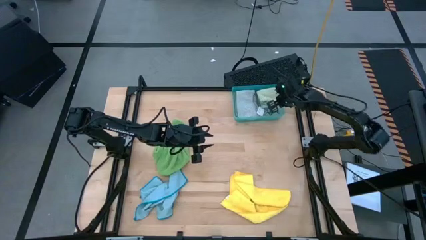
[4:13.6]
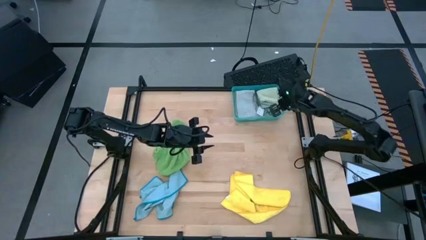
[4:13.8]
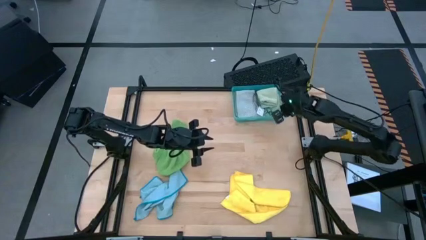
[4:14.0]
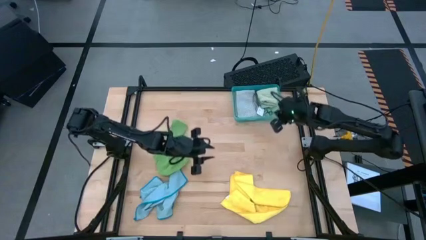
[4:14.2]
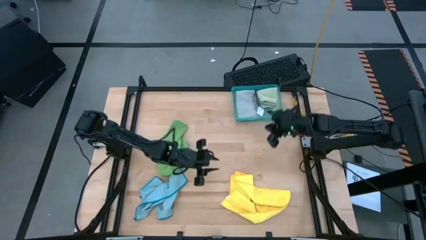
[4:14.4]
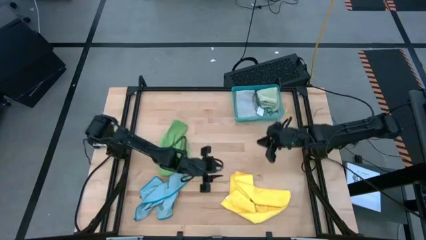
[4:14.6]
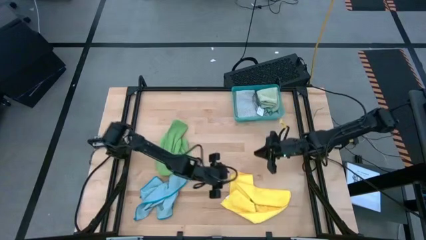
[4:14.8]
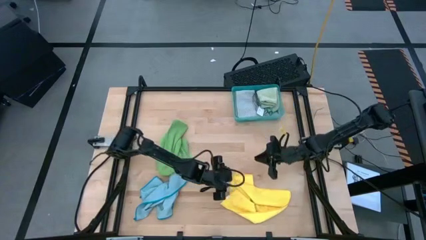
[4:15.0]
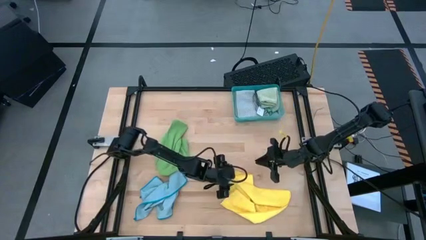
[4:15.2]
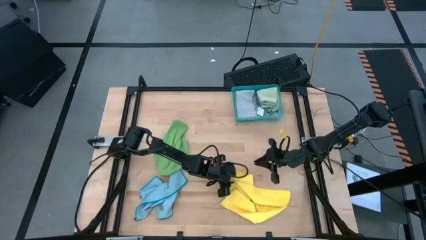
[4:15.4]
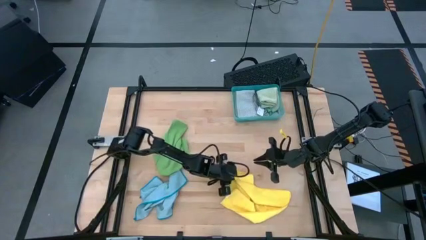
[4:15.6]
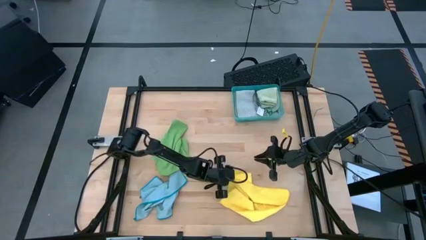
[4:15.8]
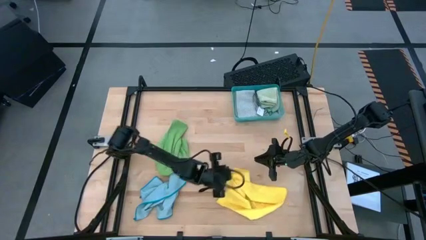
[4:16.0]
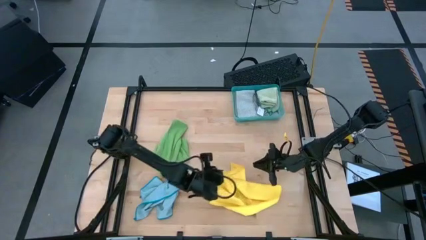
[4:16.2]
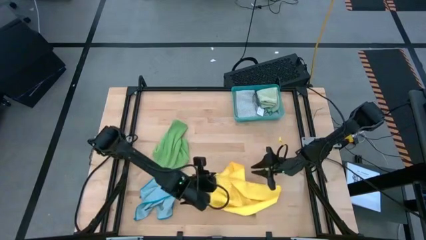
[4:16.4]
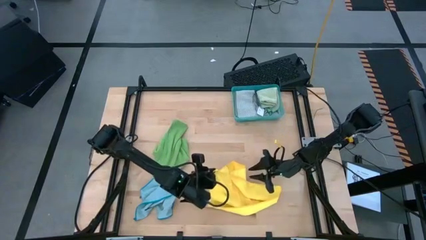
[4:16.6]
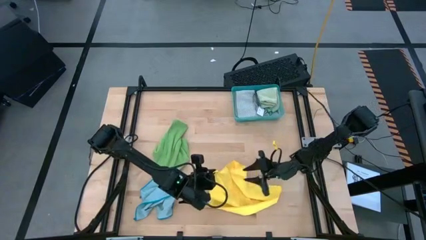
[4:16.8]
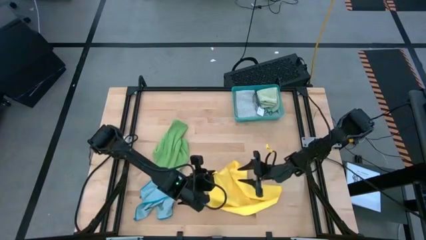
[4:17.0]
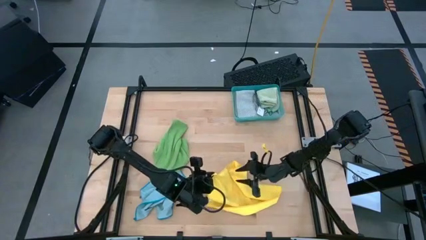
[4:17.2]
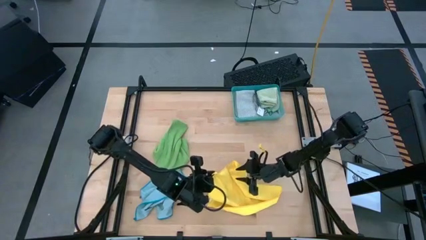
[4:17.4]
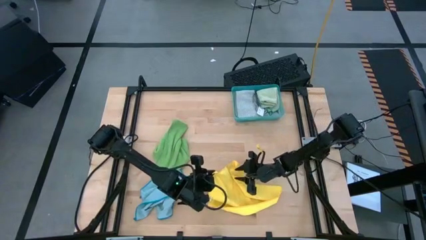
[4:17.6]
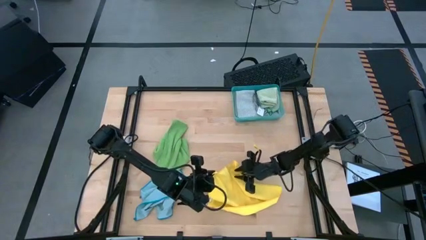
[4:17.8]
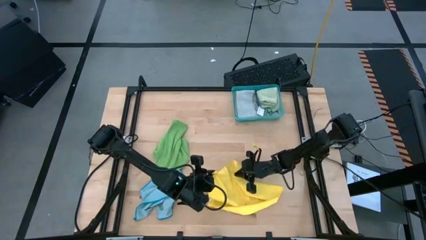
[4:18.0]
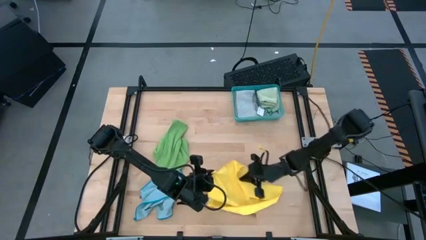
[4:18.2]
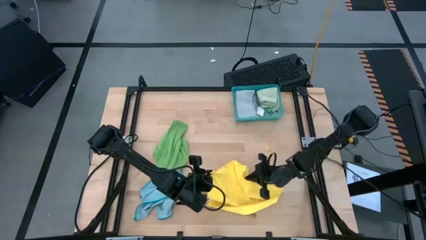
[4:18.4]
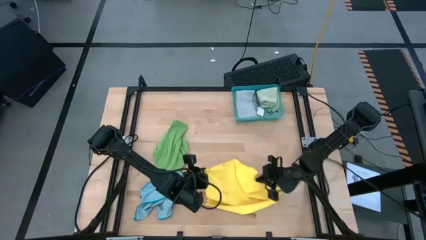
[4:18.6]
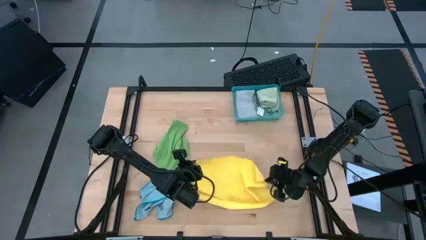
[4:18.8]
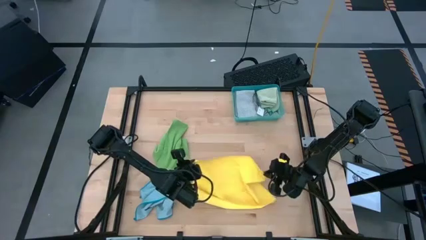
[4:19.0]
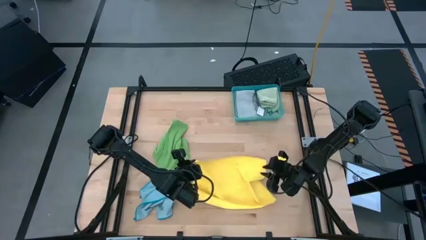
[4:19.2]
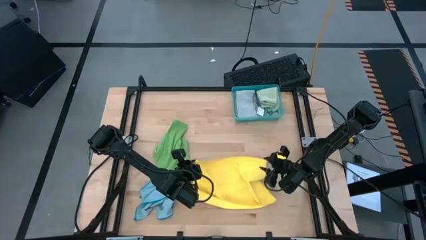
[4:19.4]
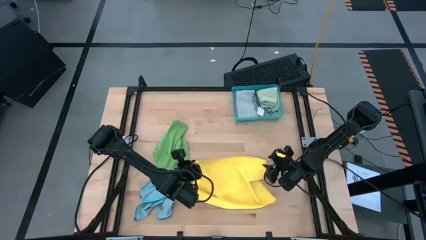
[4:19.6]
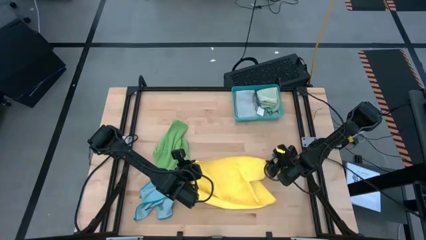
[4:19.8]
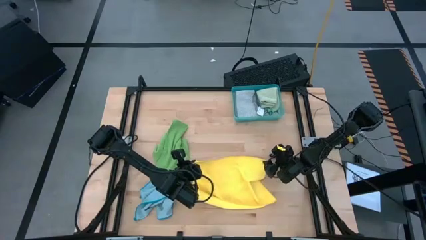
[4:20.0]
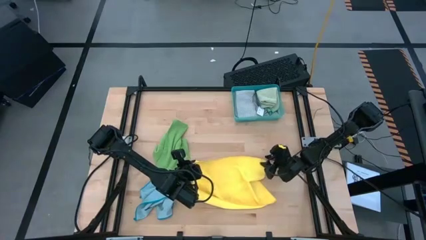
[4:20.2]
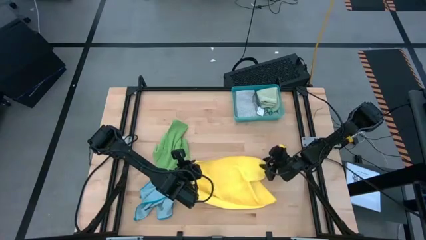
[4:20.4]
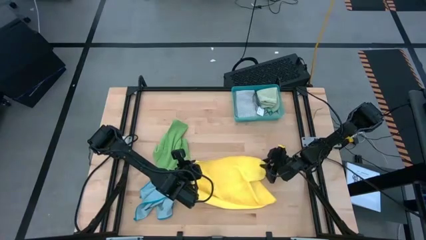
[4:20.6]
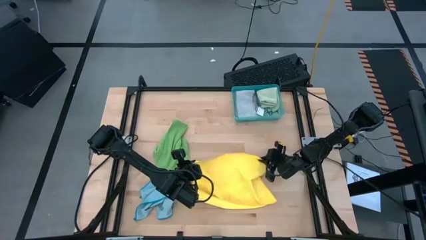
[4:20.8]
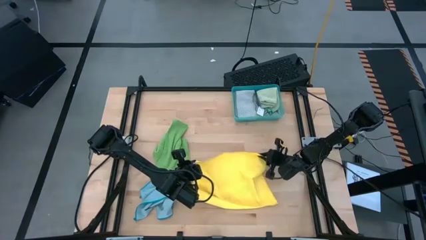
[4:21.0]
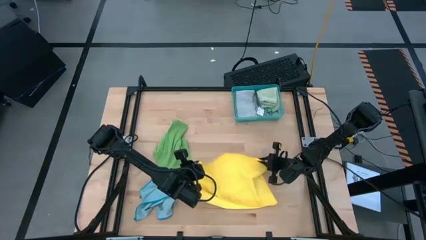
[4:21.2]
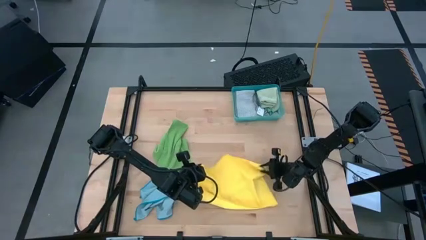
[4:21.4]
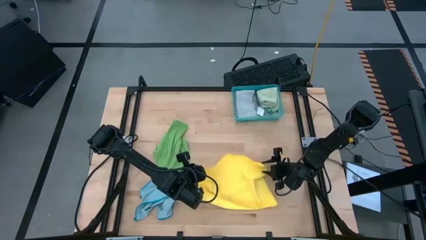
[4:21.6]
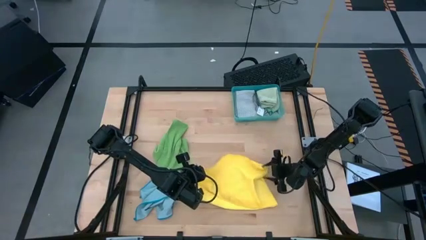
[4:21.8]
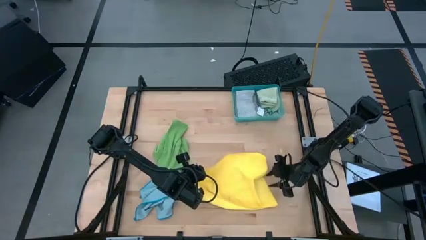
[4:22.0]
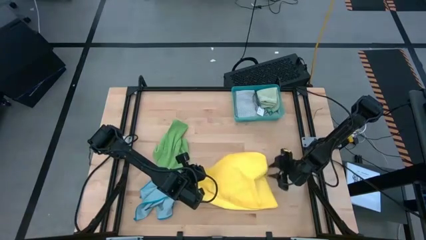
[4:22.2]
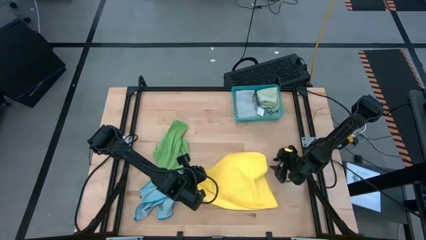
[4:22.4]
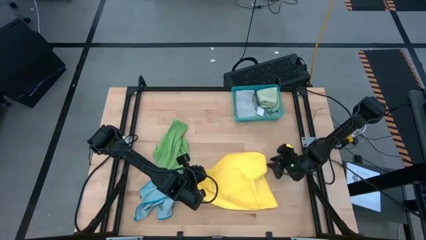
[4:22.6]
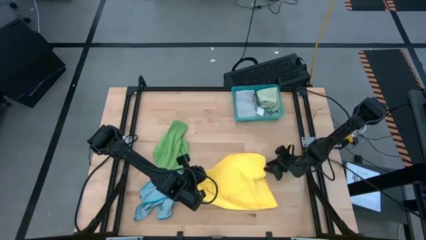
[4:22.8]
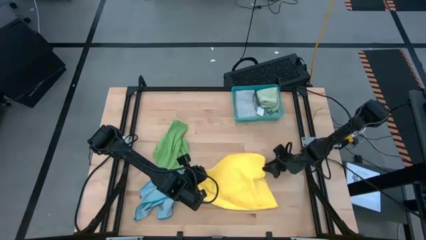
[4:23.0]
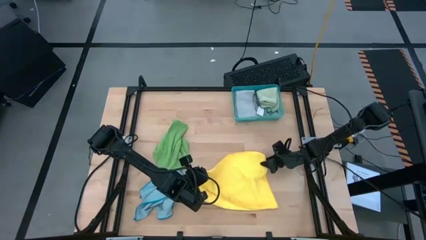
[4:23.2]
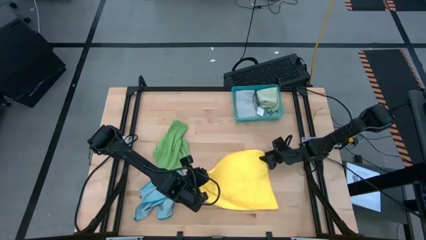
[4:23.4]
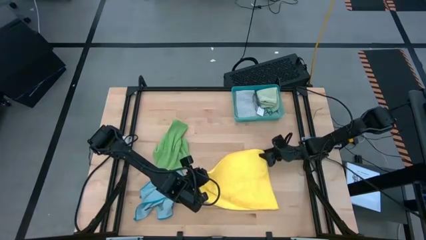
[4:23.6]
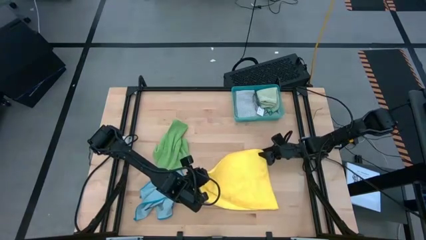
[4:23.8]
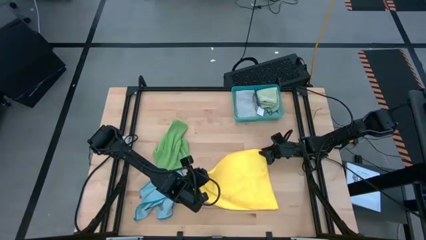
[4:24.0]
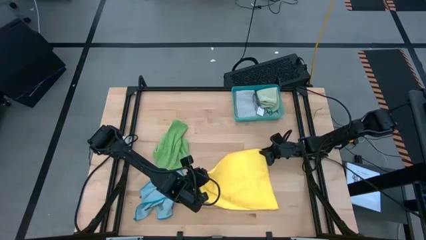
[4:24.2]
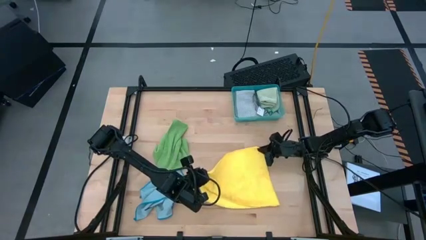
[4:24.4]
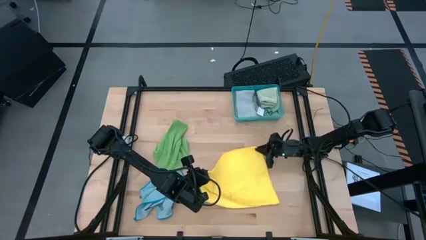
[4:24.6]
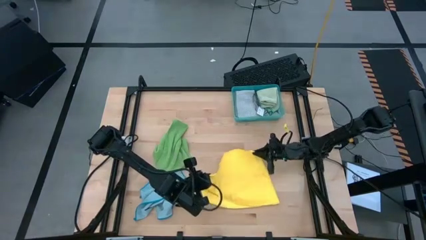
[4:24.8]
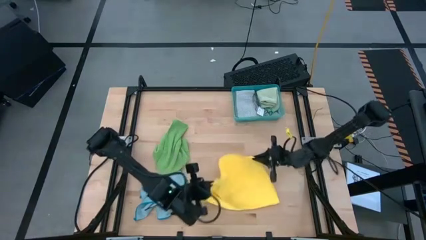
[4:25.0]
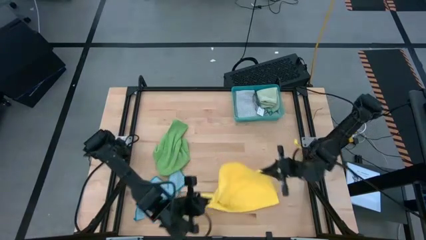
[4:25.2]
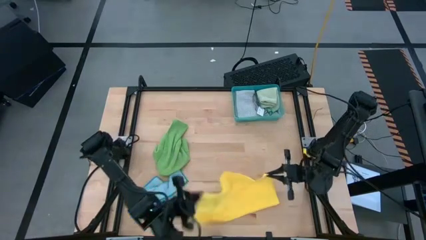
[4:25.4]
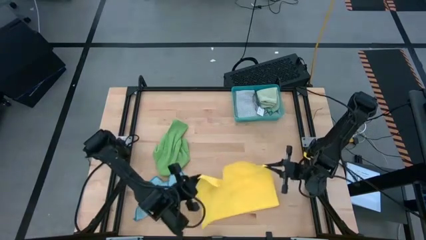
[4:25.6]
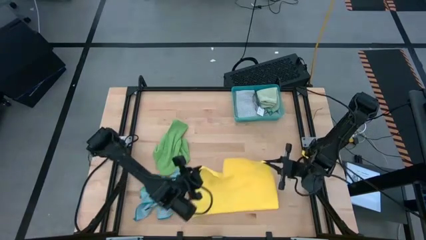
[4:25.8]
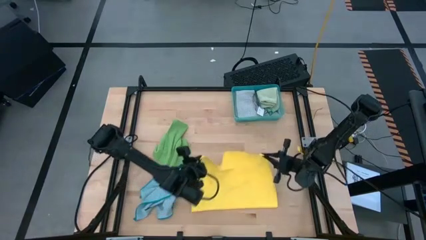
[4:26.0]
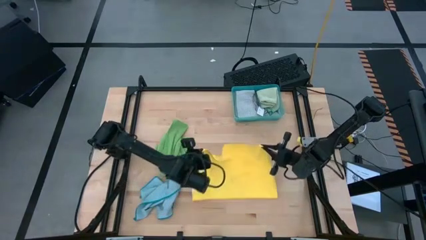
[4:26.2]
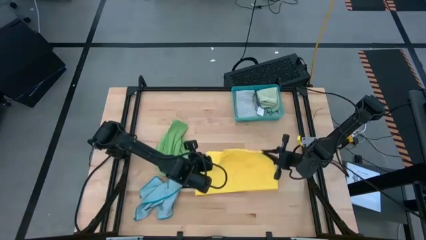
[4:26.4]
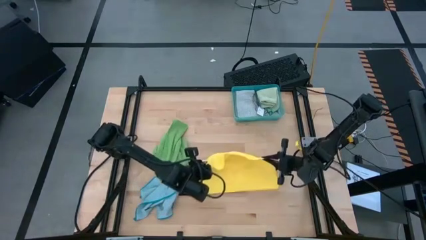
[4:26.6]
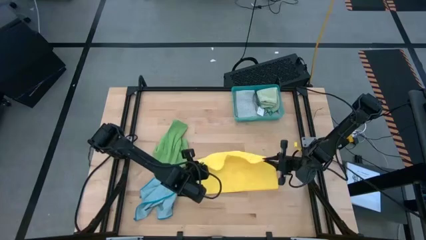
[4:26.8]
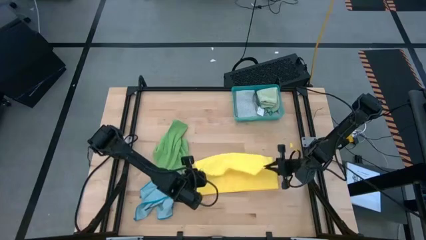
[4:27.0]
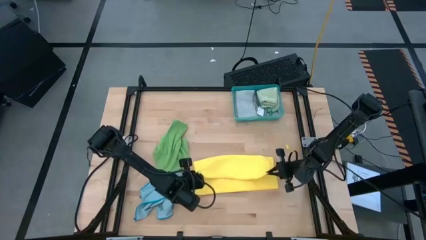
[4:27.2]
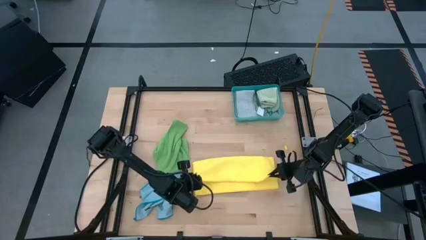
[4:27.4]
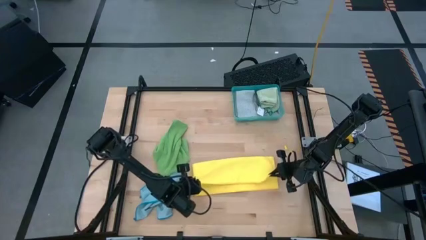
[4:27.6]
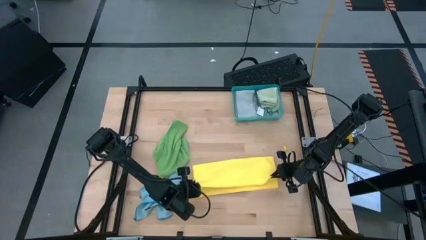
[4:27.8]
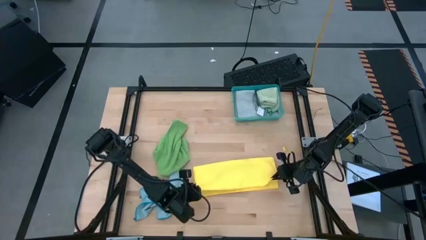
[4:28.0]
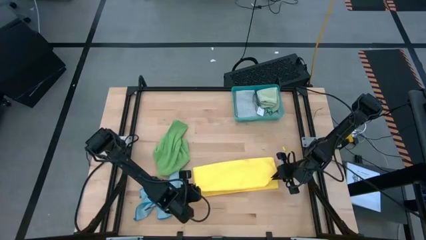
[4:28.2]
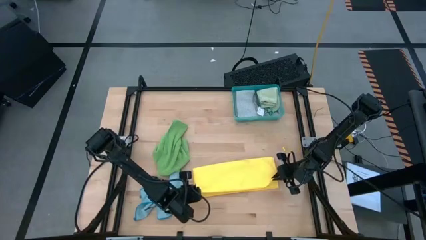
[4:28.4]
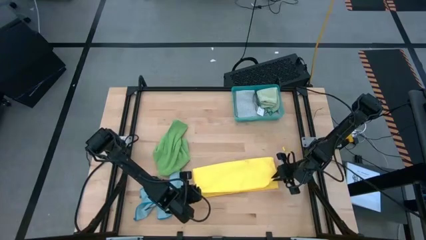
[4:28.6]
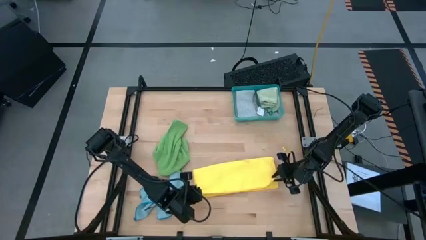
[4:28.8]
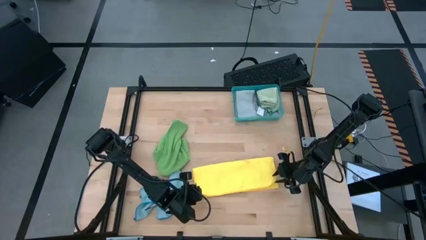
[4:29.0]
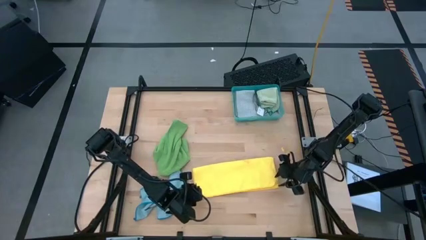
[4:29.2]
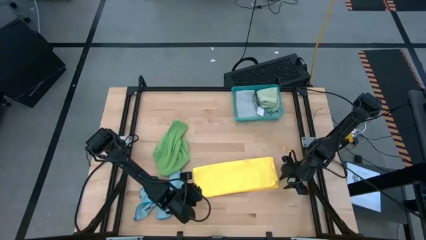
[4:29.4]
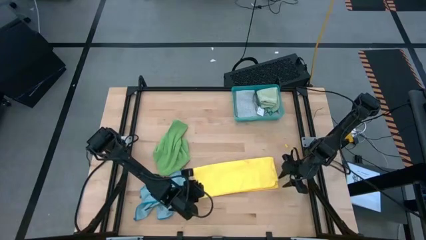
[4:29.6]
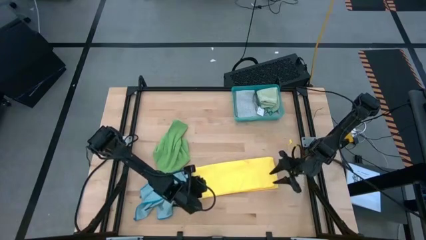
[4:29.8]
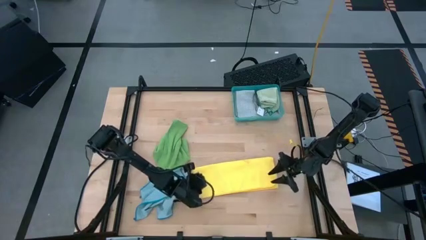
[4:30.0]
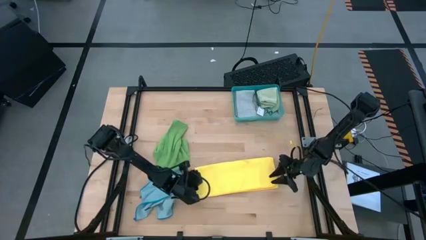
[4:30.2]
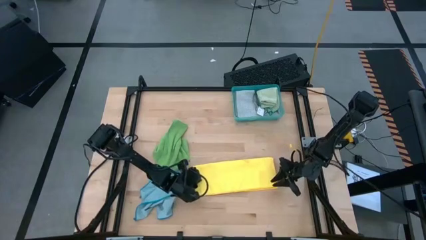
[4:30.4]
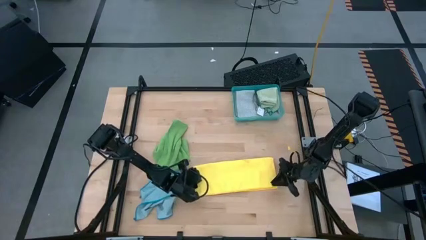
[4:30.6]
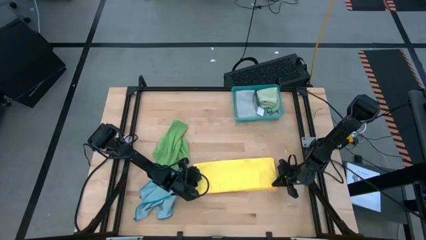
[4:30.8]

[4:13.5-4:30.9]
Task: Fold microfiber towels
Fold the yellow microfiber cloth
